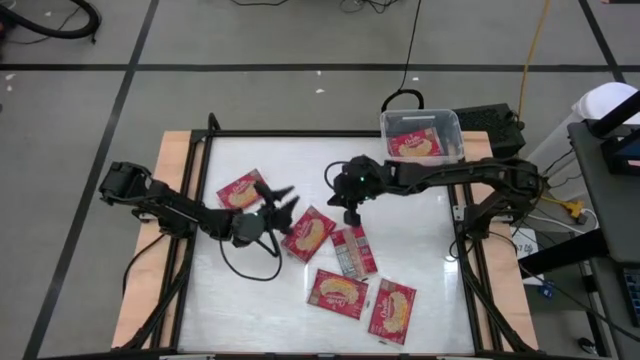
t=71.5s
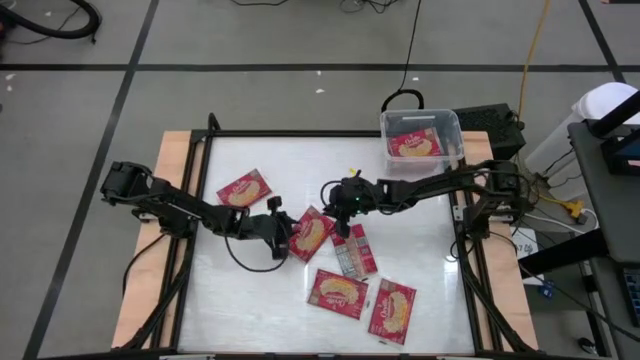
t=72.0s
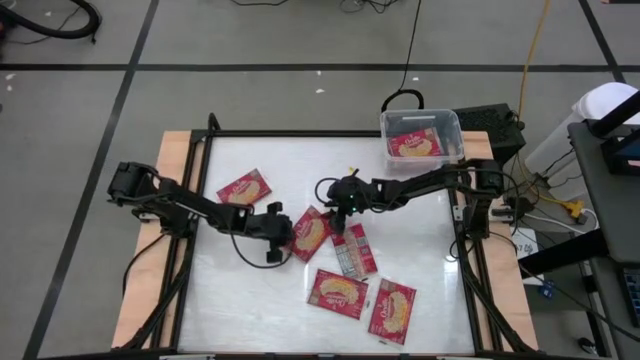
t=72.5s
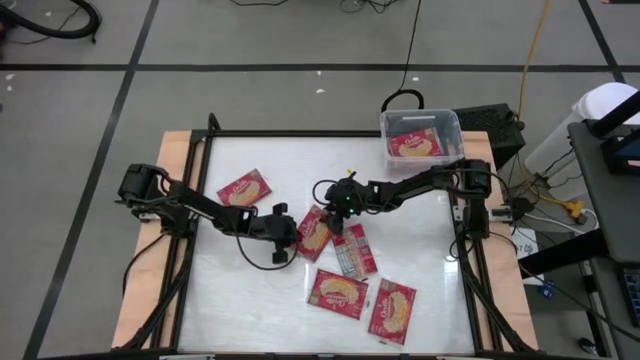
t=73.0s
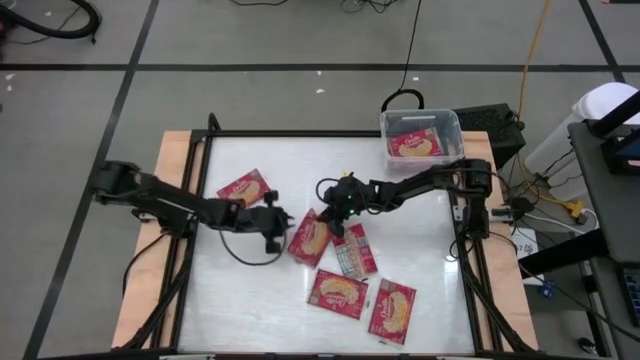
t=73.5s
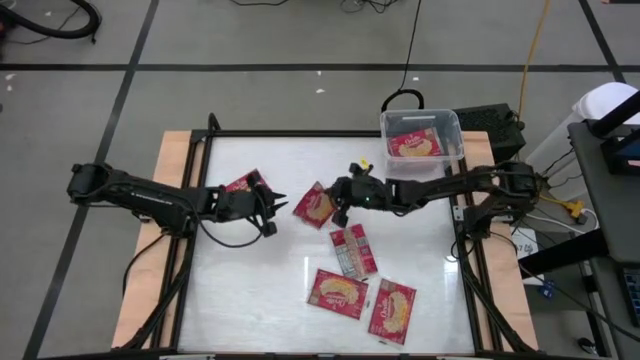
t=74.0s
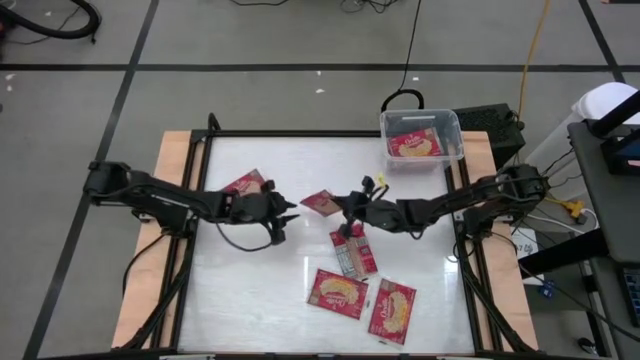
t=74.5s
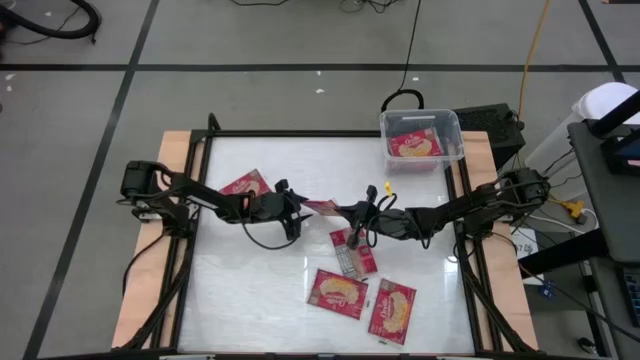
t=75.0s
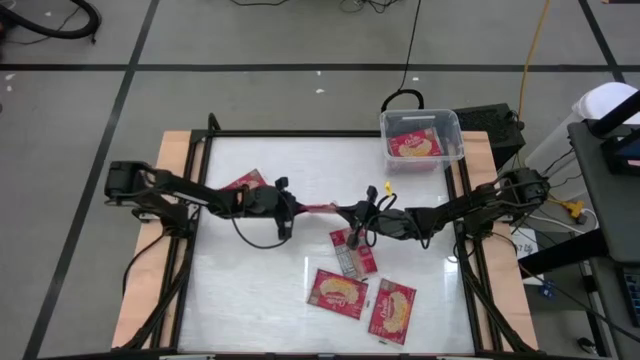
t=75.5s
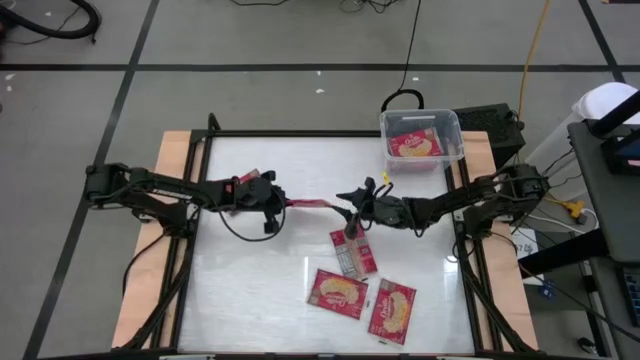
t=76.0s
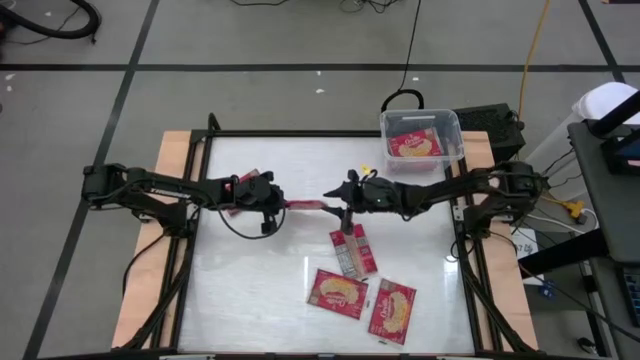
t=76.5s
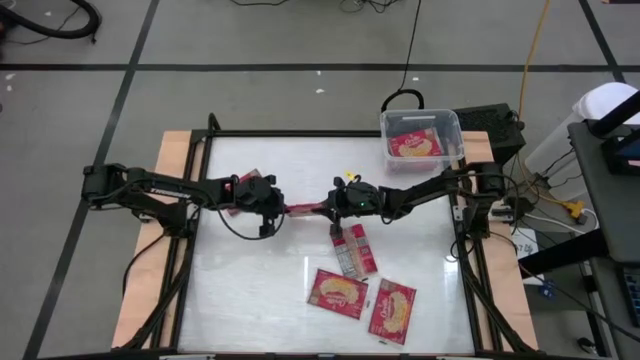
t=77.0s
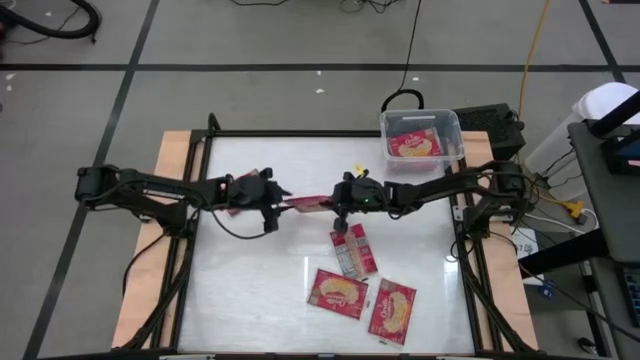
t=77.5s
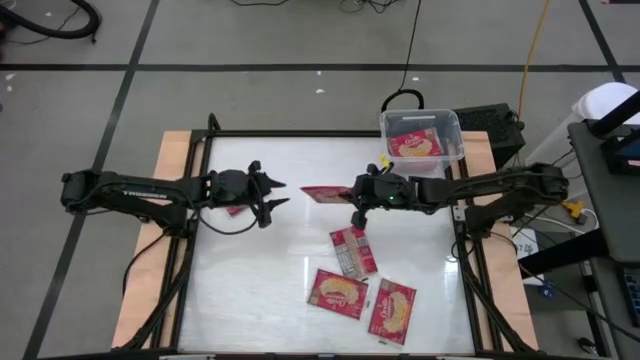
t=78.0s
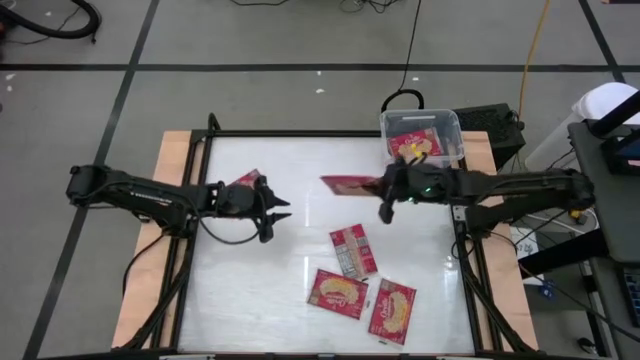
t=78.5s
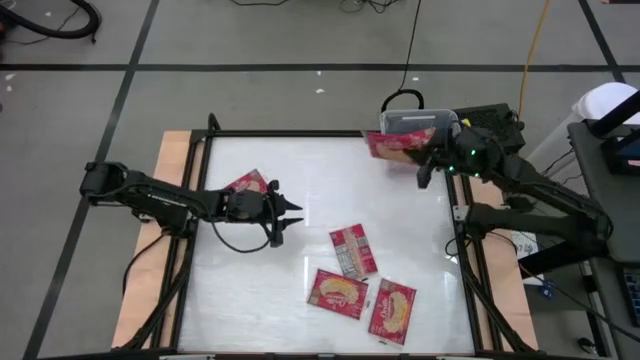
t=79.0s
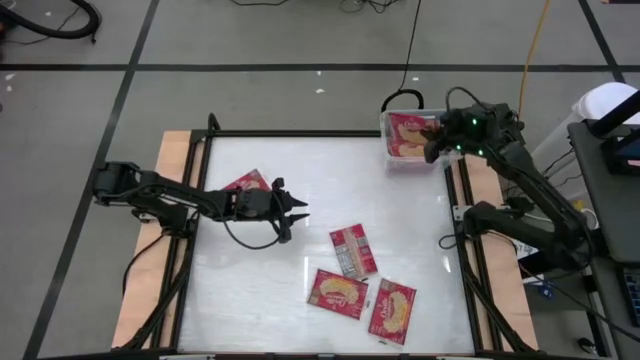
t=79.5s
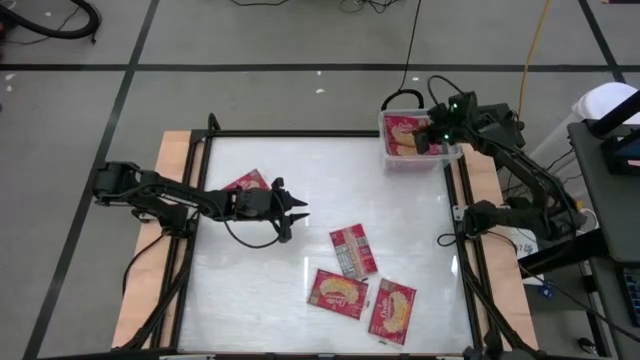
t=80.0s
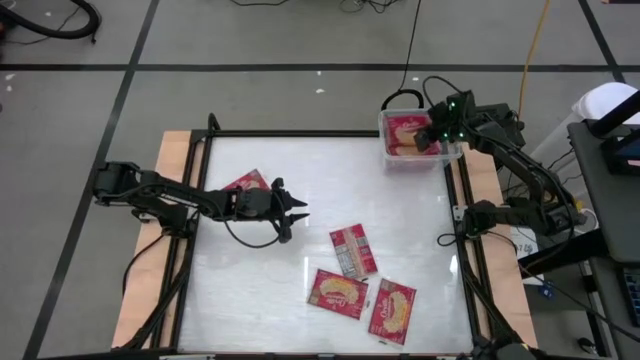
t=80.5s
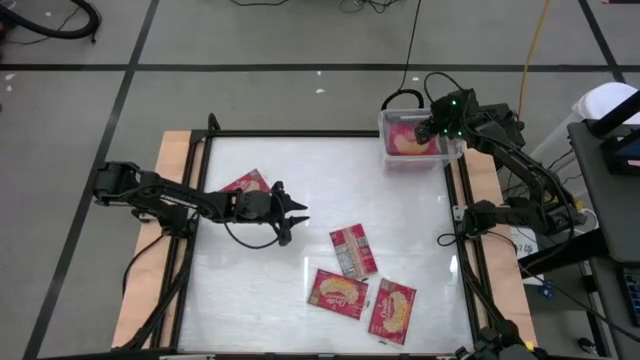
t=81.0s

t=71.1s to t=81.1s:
Task: Sort popcorn bags into baskets
Put the red popcorn bag into the transparent bin

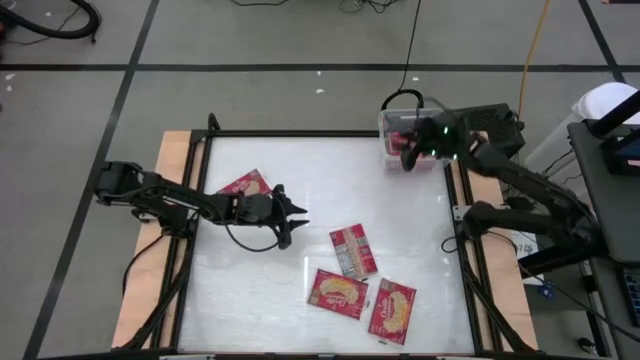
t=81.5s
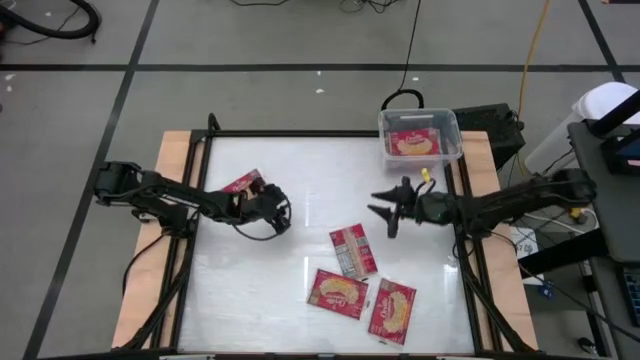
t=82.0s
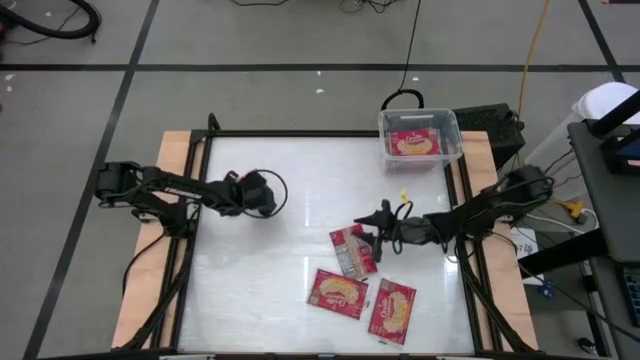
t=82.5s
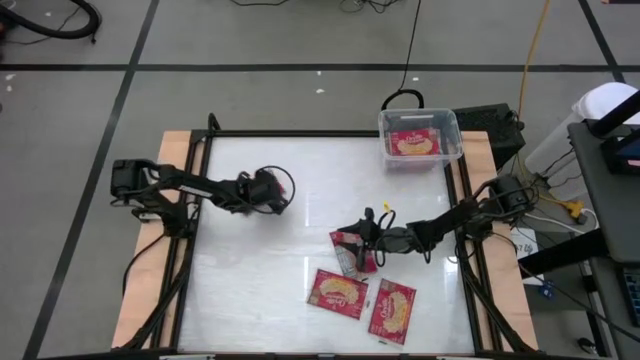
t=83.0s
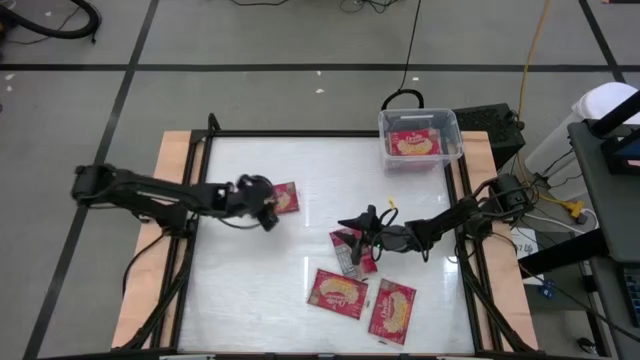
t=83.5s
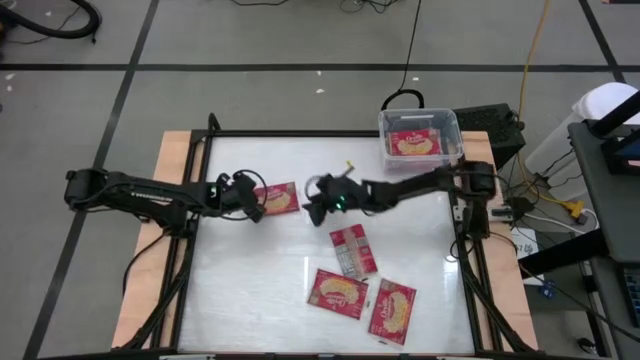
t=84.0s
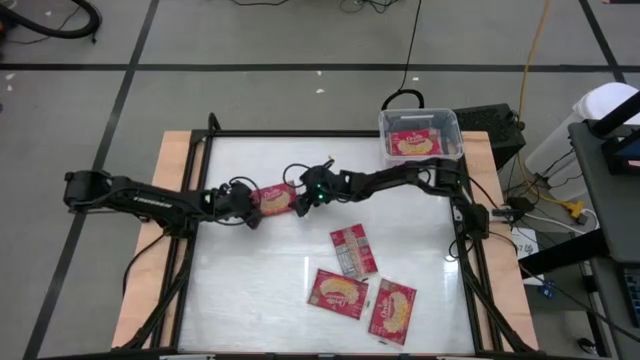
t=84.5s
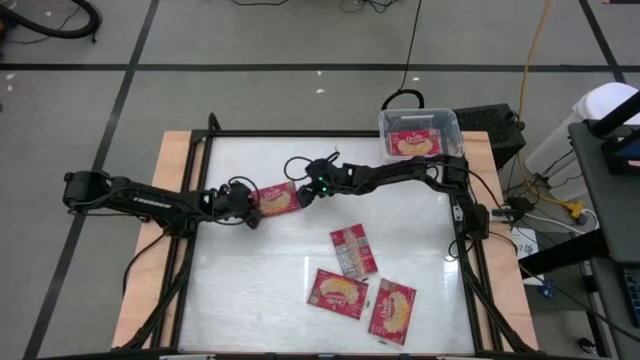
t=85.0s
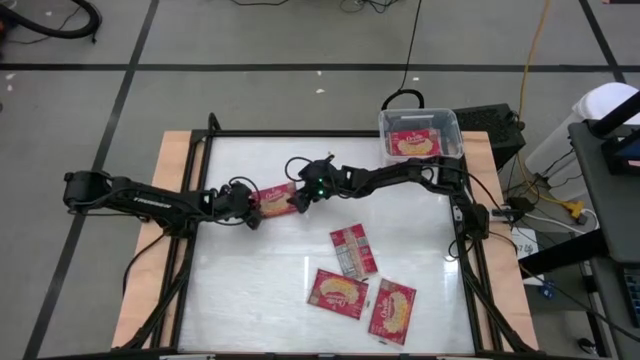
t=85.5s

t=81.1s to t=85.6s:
Put the red popcorn bag into the transparent bin

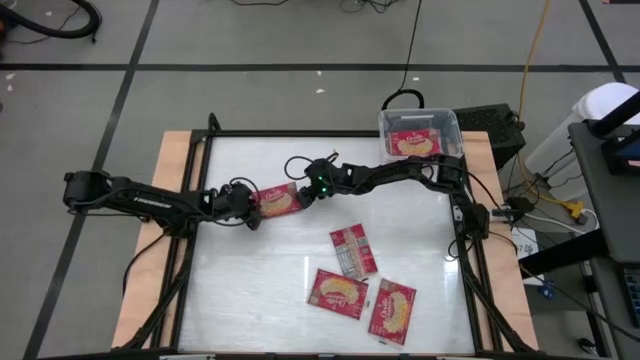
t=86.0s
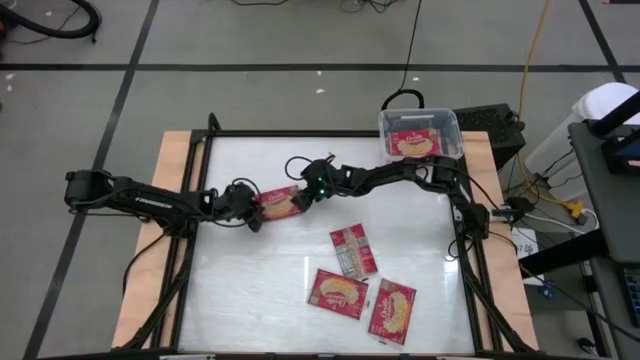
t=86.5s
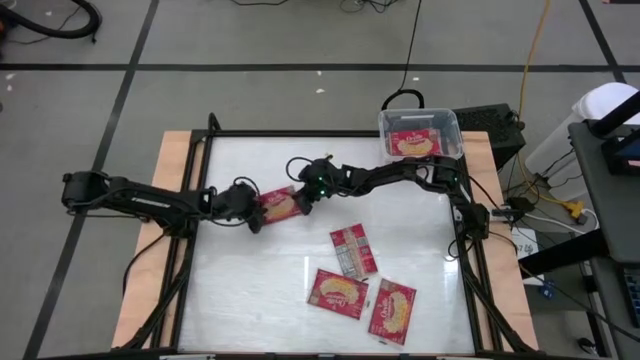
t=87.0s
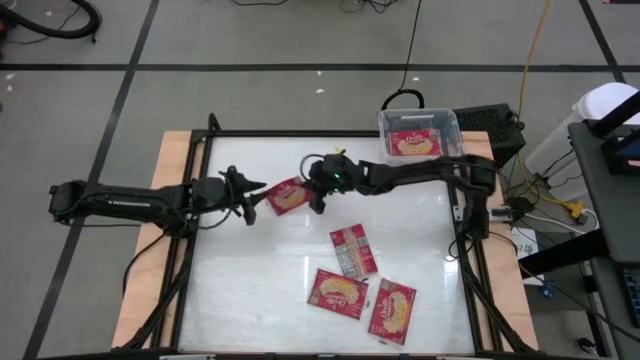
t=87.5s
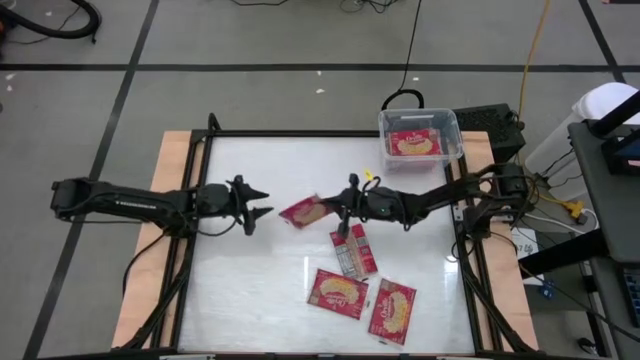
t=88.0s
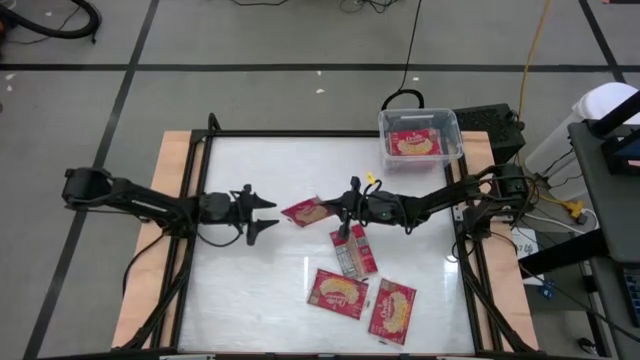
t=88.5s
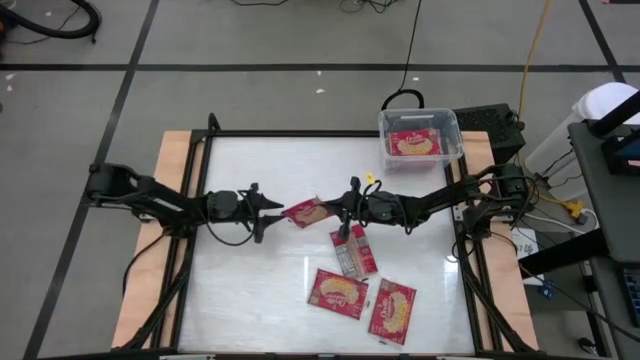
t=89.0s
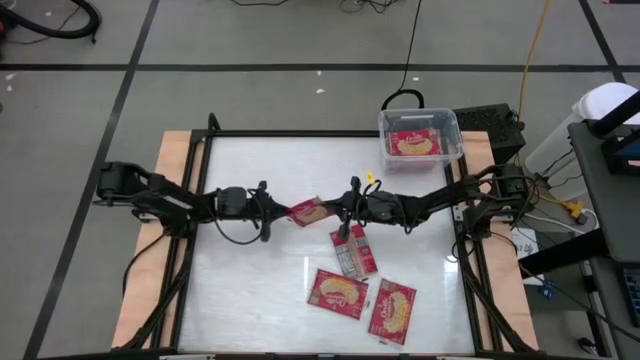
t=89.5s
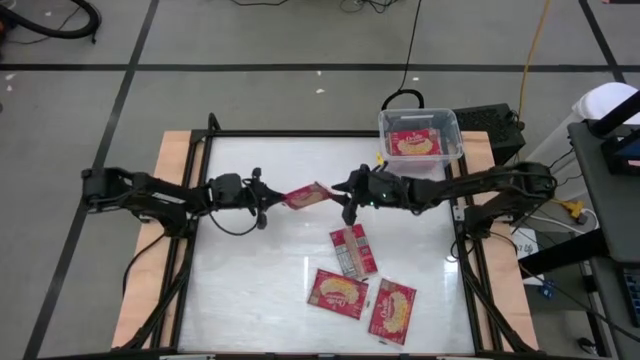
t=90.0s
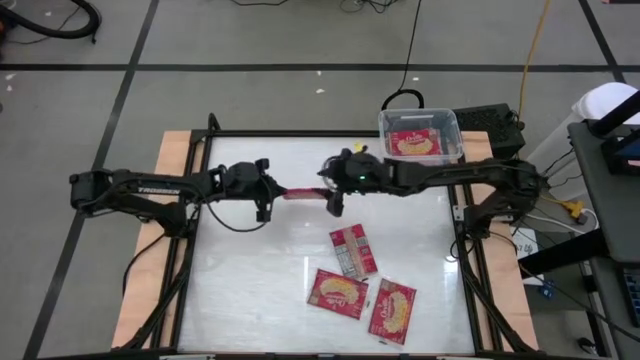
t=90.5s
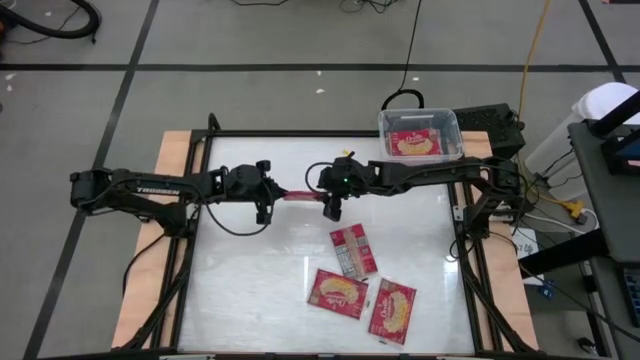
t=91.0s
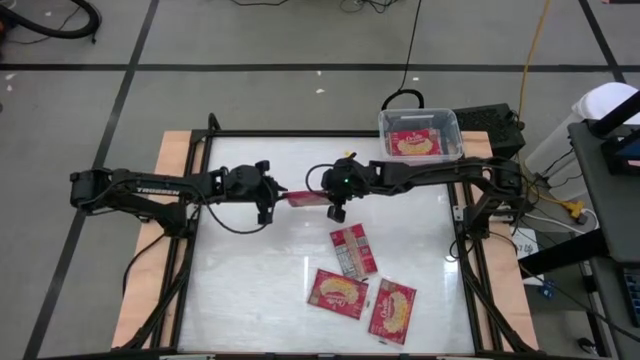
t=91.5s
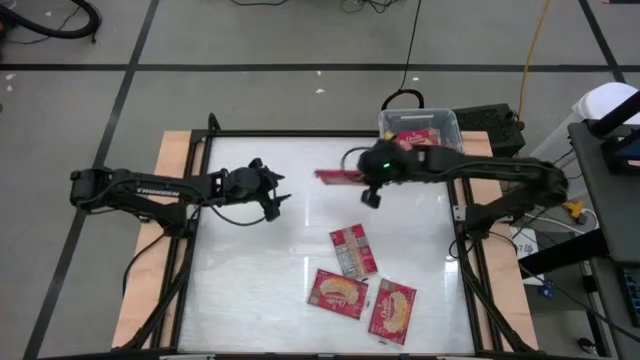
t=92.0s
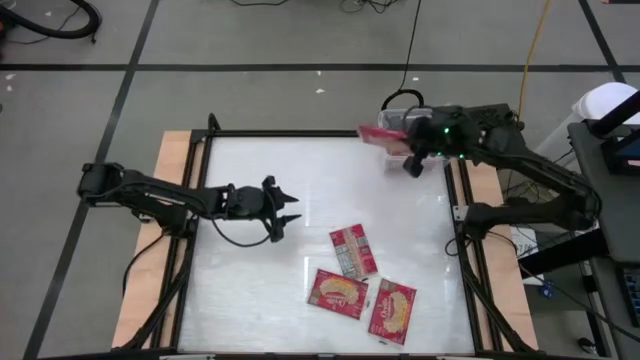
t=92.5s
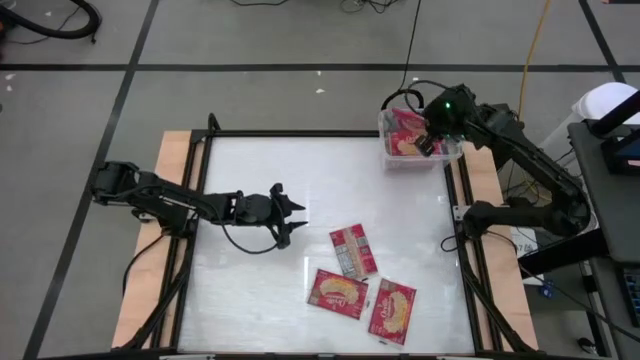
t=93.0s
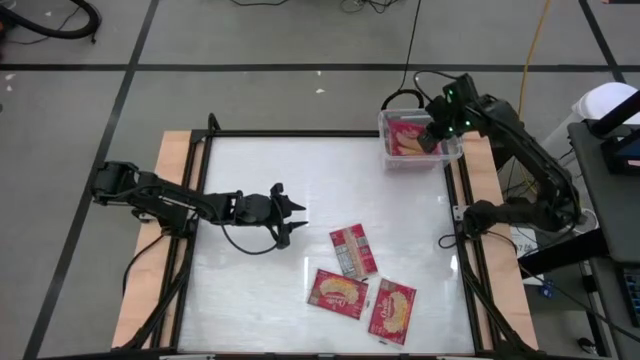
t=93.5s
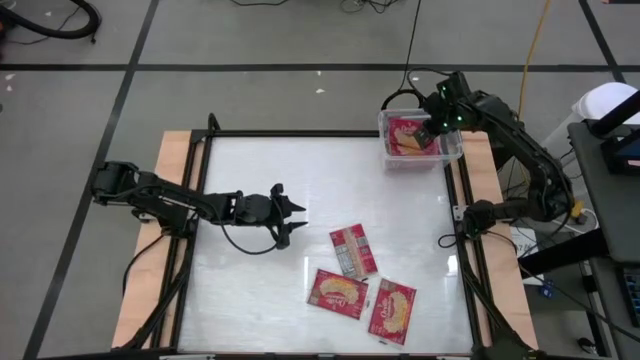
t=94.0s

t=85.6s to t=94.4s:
Put the red popcorn bag into the transparent bin
